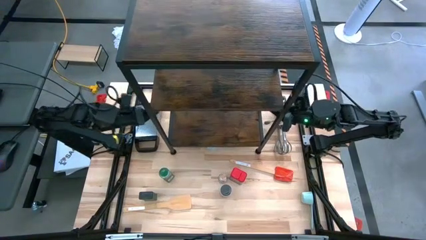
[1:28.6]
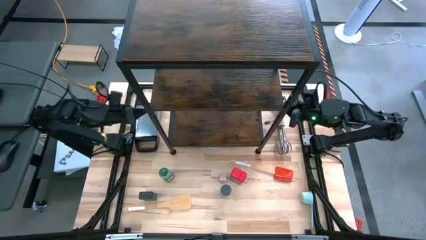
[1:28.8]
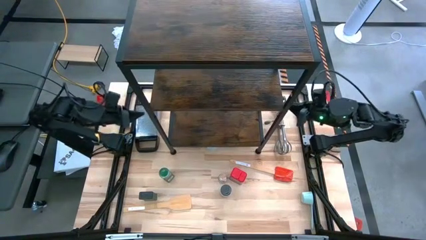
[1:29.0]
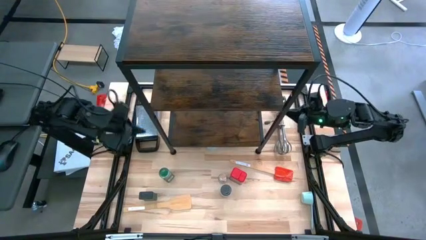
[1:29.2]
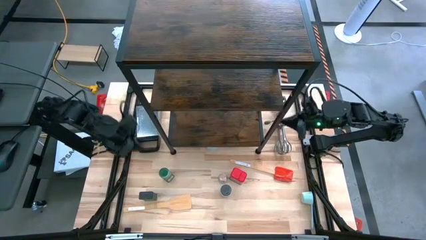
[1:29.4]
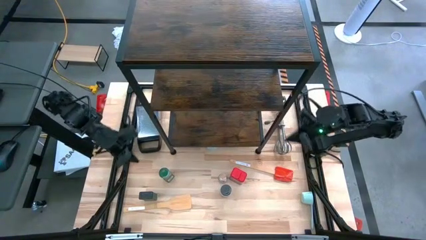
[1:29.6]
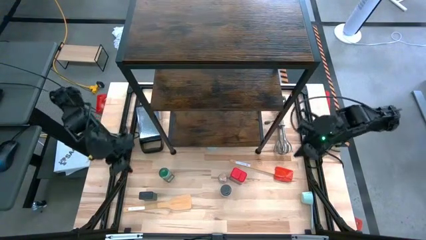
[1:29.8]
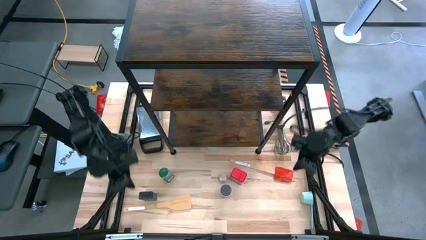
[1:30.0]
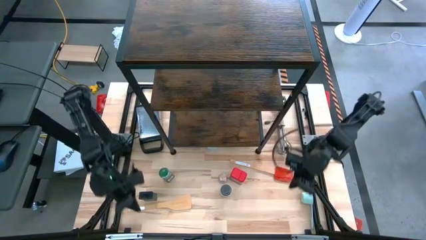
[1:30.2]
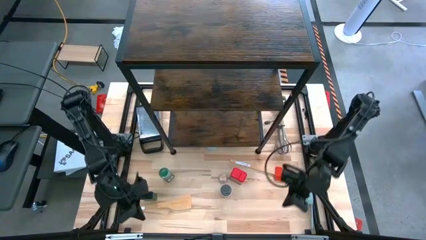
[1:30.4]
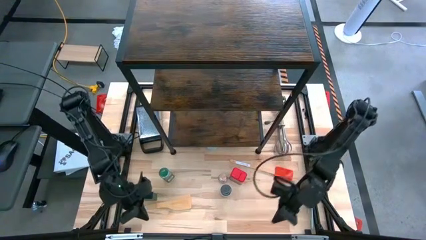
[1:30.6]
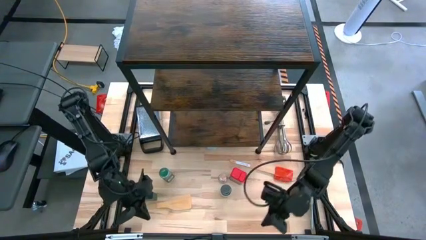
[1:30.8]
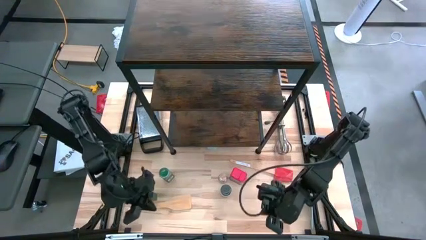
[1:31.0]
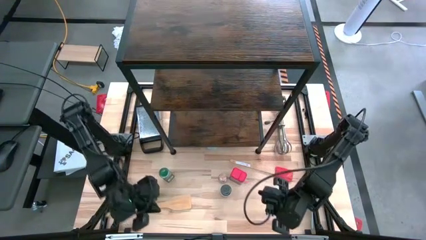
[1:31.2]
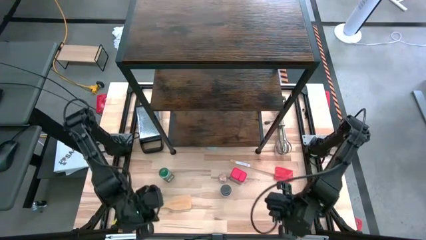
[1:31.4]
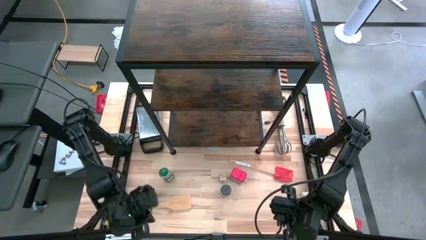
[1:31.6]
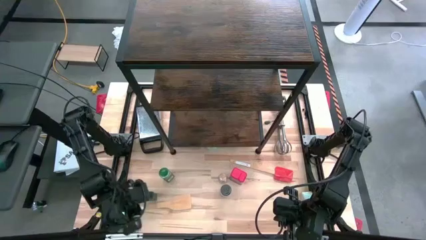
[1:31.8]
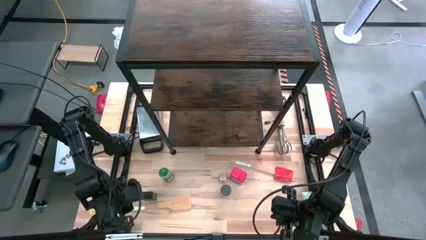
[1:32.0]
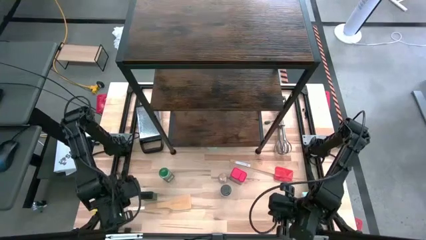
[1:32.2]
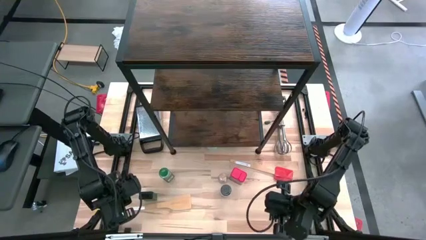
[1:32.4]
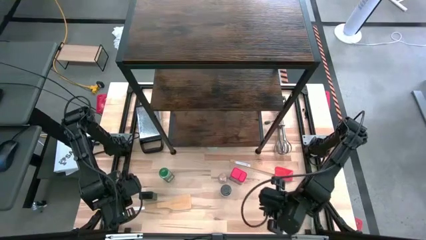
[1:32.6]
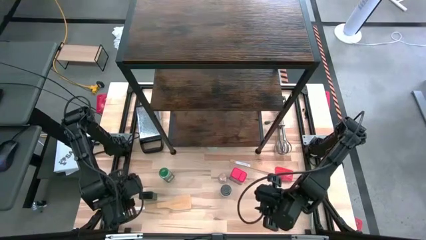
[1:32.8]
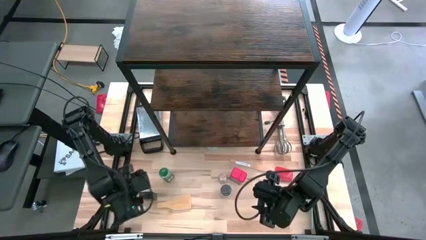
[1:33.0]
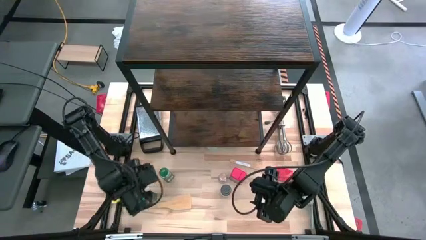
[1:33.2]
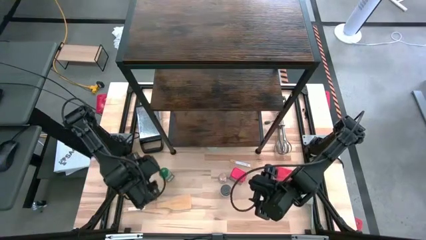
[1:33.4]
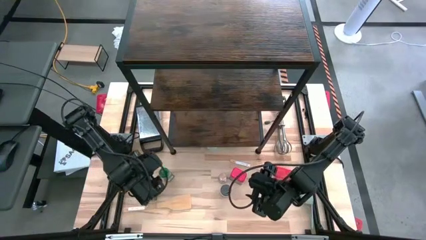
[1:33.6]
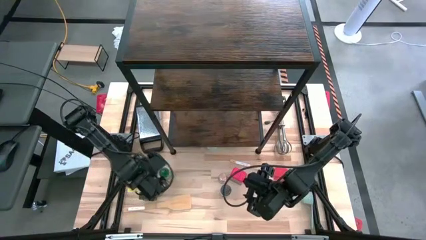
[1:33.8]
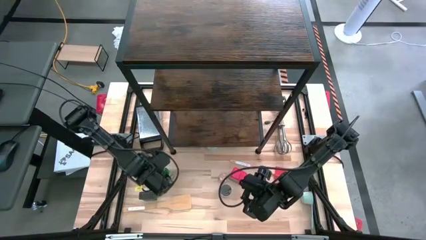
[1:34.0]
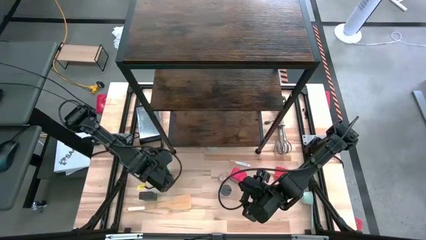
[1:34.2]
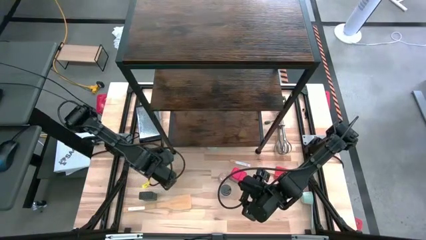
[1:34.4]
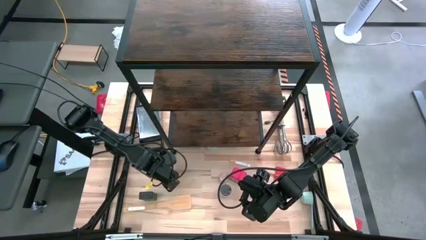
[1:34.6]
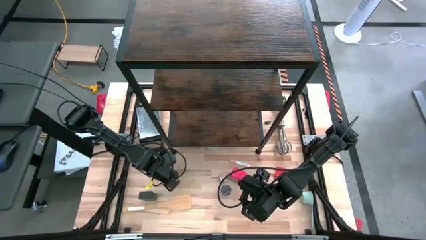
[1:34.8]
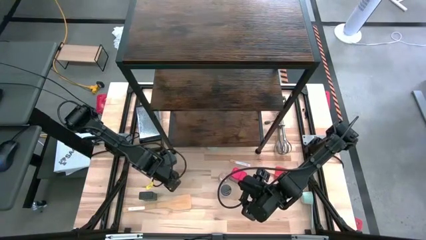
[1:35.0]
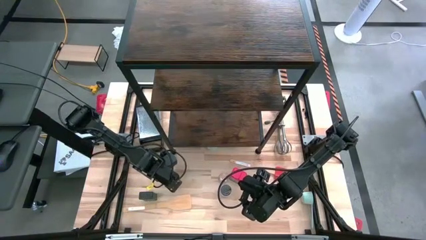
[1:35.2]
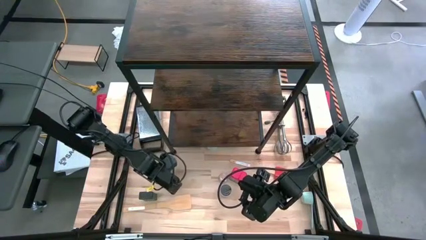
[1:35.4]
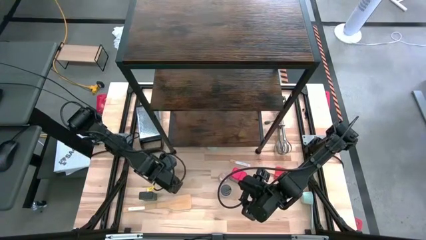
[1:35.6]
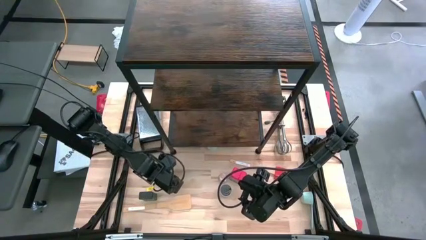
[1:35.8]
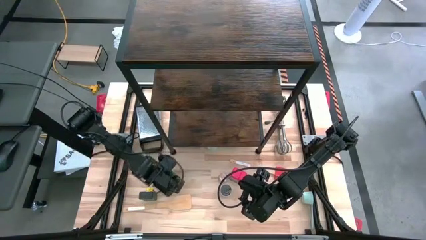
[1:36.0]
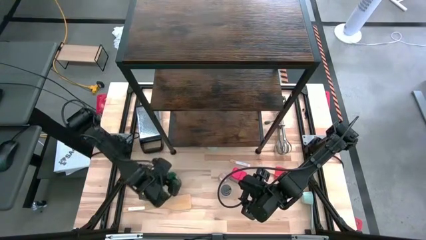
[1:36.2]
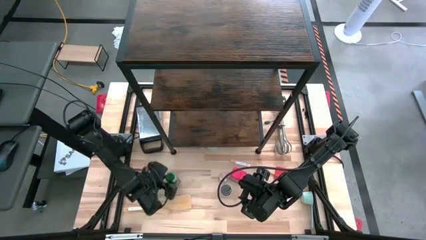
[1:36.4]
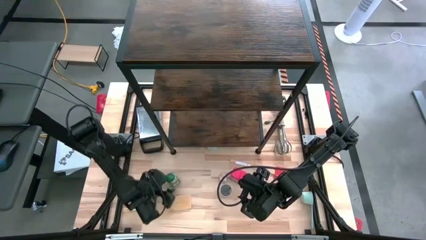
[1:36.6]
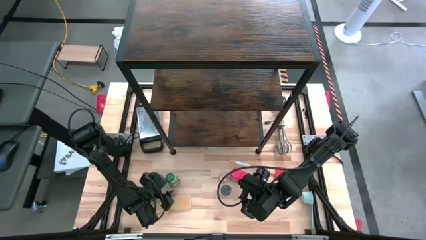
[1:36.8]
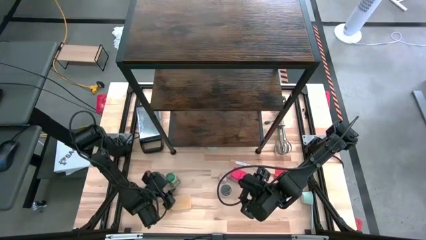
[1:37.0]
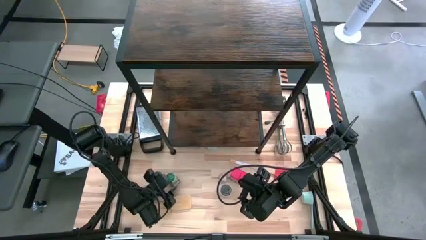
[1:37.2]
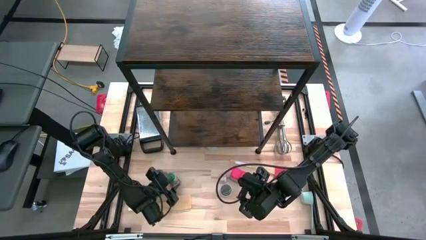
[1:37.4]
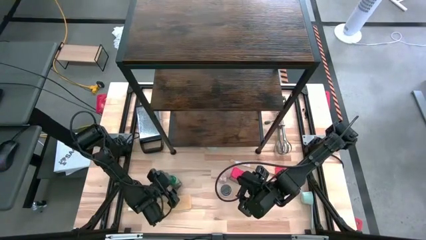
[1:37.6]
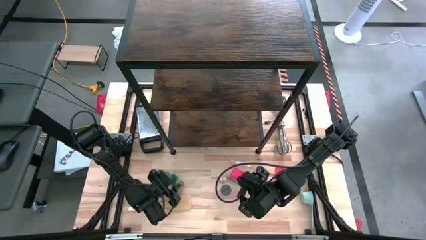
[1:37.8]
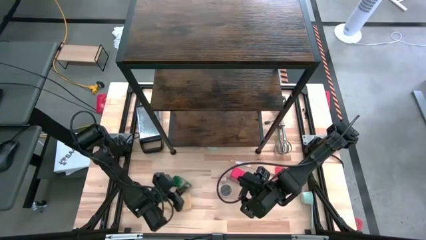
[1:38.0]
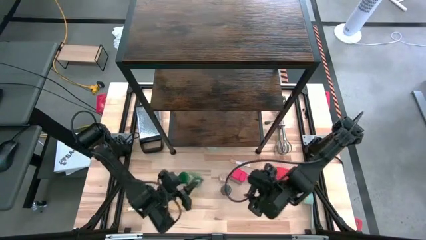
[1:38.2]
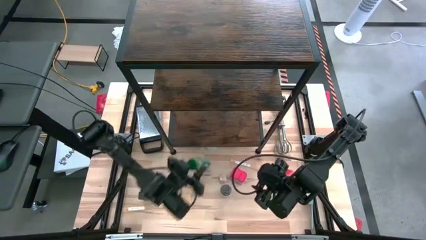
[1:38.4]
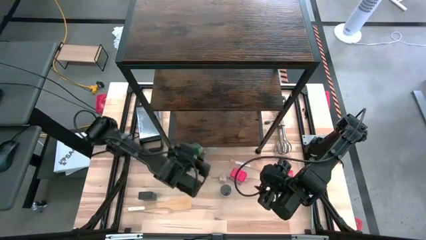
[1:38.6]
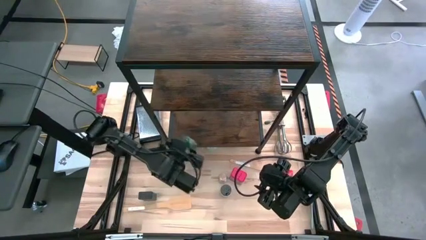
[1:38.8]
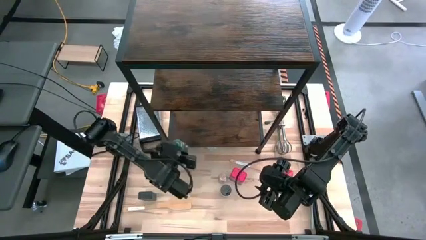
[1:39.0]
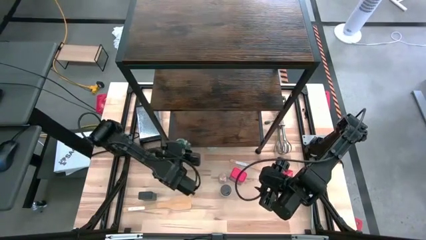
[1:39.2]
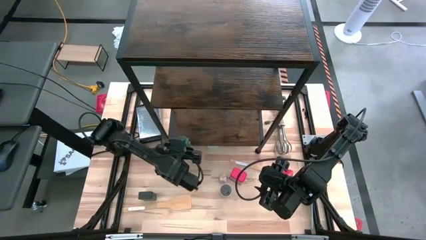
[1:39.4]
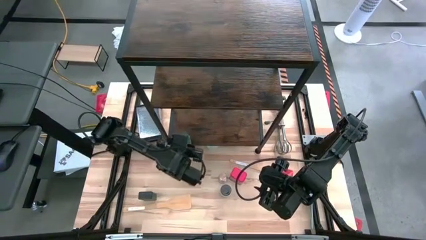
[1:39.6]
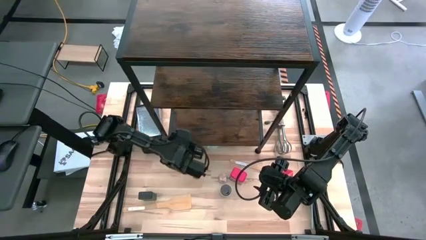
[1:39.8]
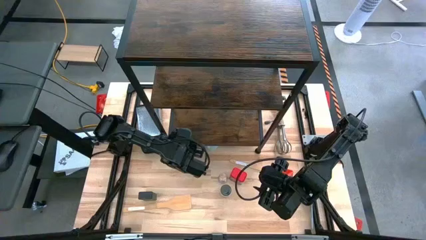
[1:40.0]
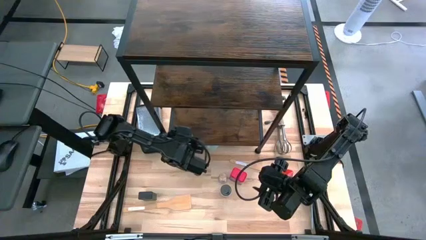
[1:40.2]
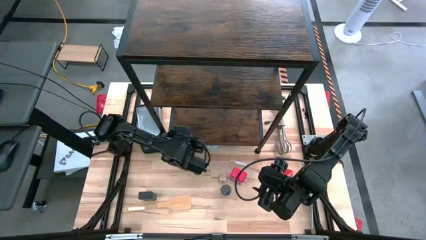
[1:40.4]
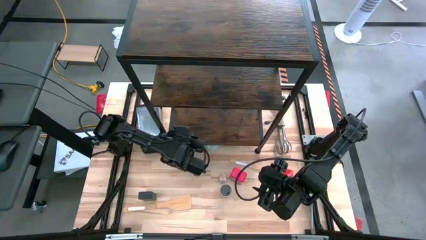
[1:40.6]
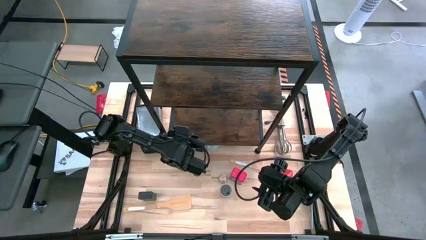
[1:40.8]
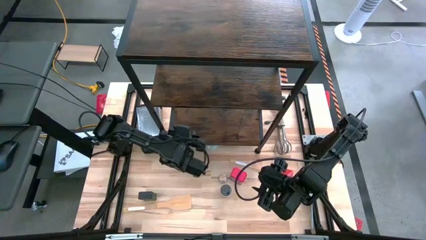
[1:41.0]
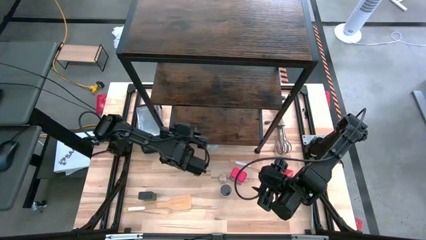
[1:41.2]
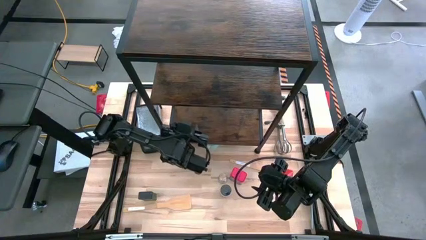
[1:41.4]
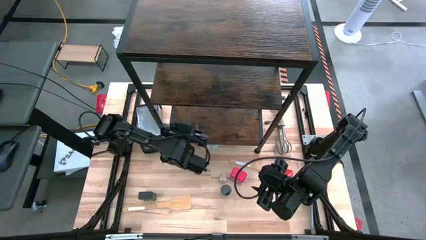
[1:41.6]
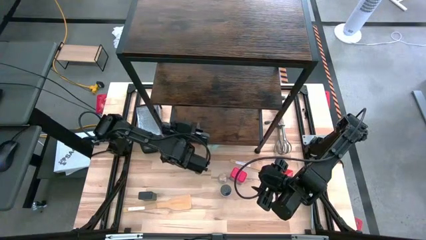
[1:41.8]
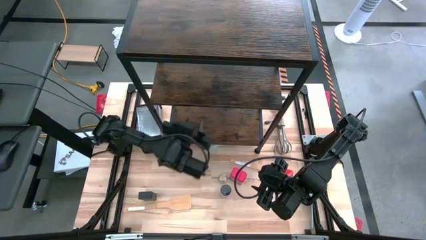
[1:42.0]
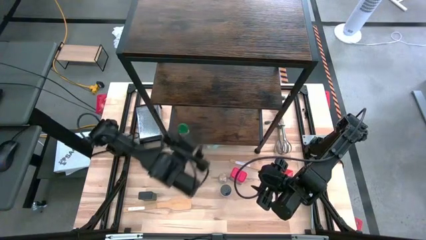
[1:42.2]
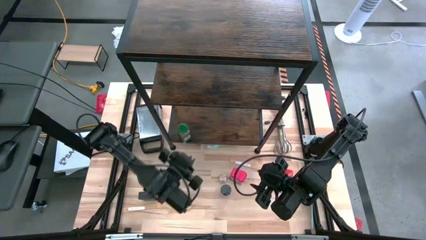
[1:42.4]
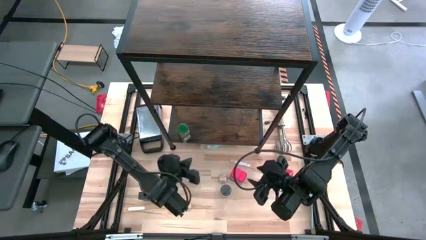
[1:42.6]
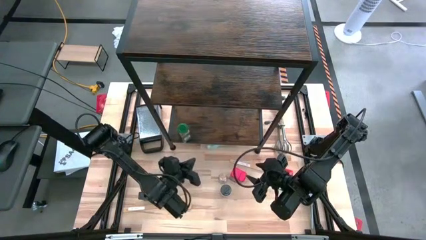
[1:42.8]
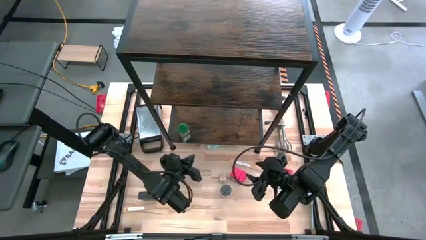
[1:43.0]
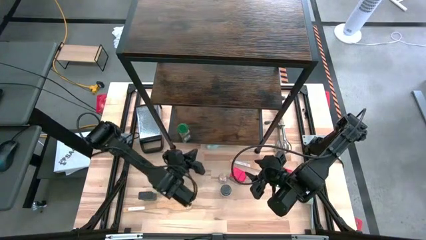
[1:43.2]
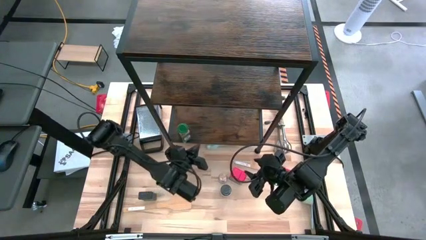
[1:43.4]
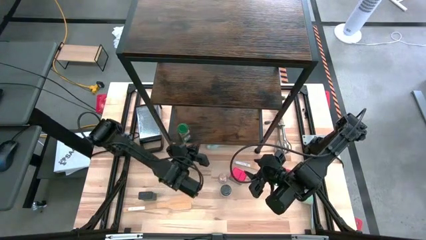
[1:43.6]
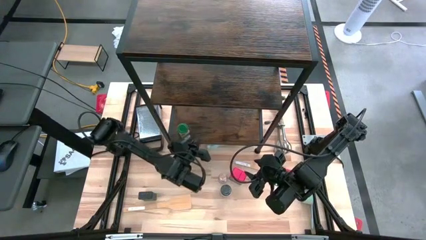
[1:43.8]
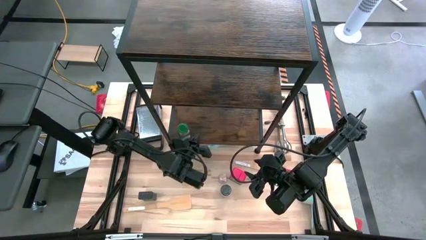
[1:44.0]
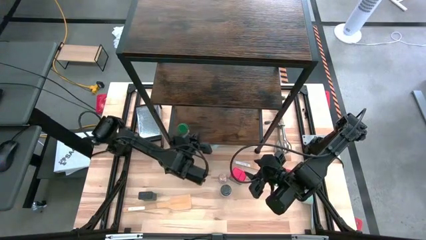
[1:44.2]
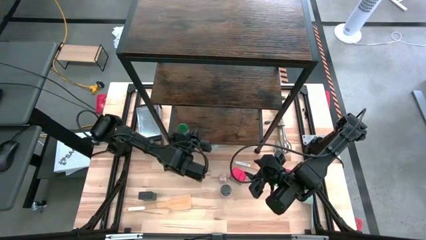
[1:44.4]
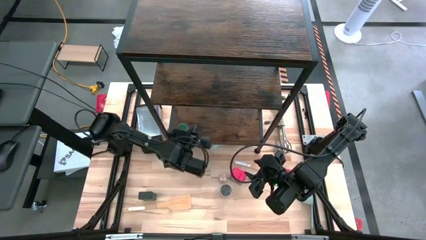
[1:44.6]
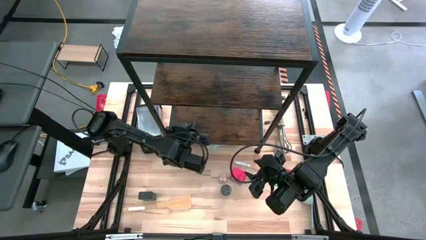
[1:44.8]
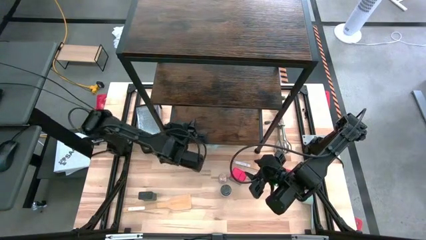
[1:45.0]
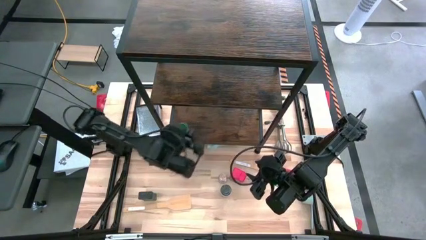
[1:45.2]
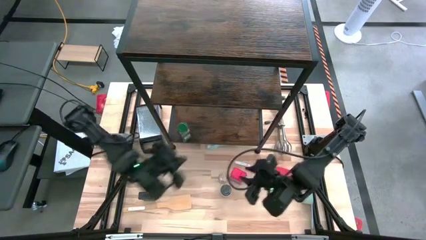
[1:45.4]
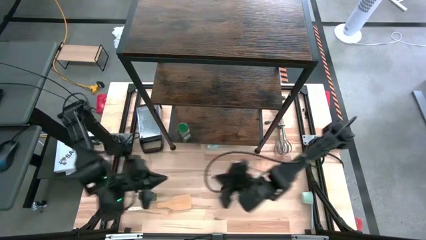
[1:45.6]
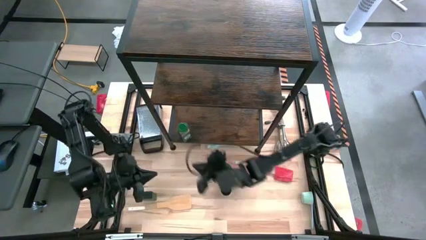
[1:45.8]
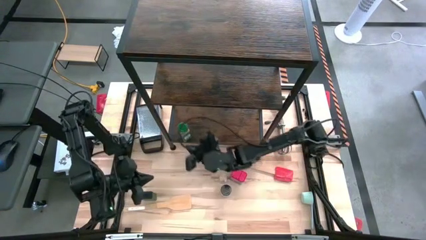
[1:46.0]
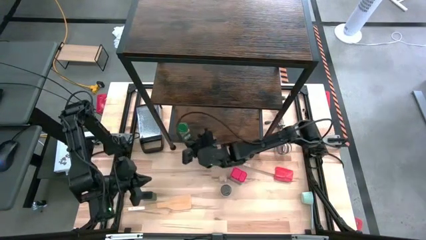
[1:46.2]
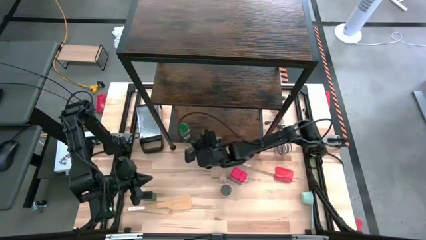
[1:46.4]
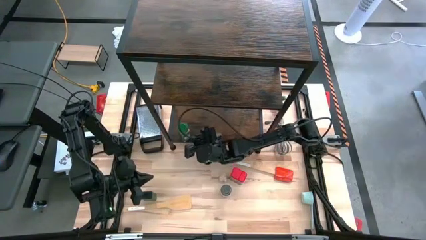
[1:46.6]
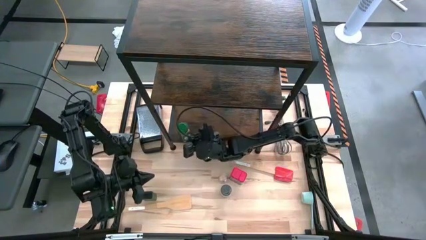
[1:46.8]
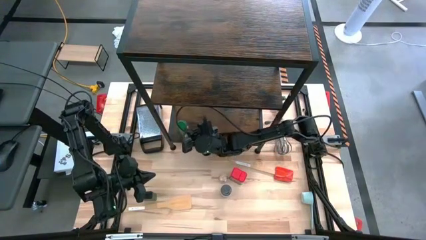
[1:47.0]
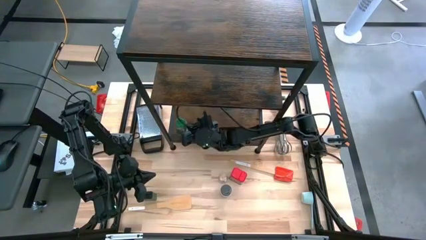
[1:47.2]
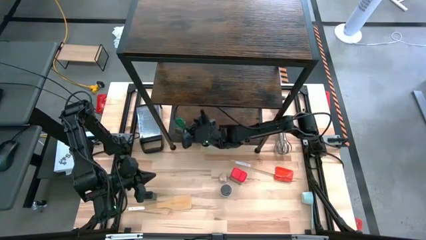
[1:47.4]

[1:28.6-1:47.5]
Task: Shelf spices
Put the green seasoning bottle onto the shelf
